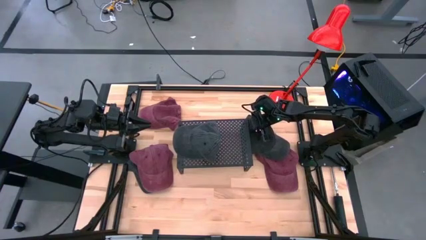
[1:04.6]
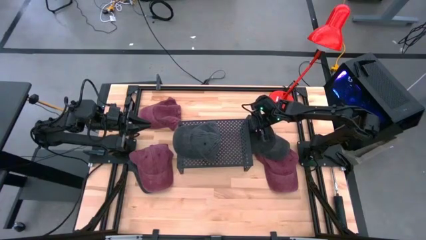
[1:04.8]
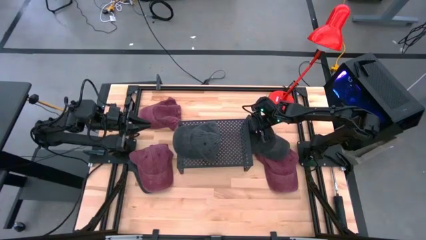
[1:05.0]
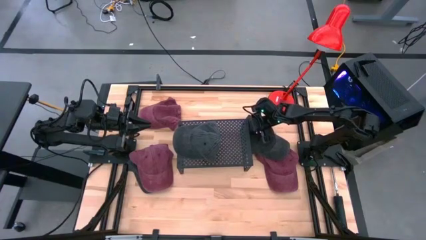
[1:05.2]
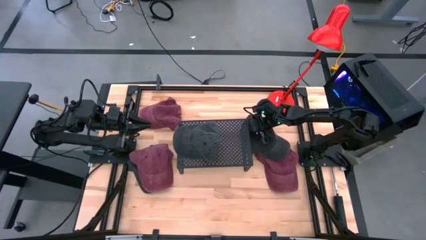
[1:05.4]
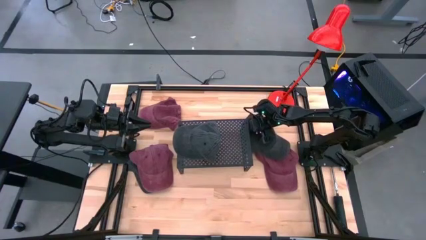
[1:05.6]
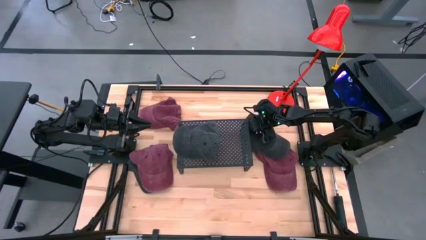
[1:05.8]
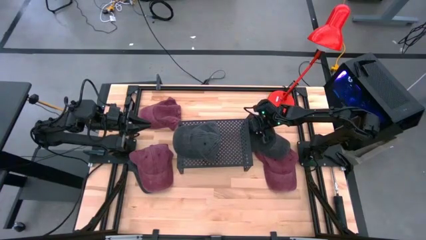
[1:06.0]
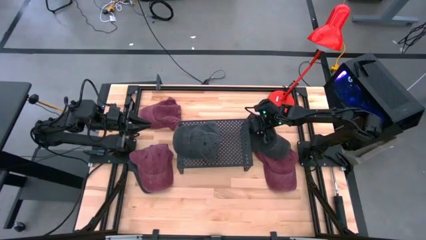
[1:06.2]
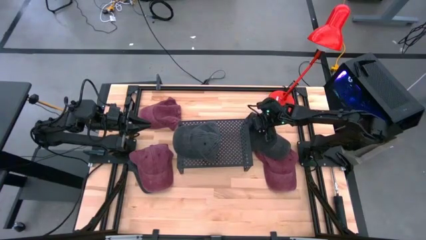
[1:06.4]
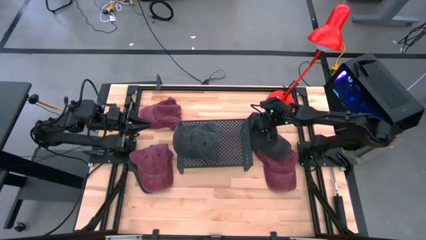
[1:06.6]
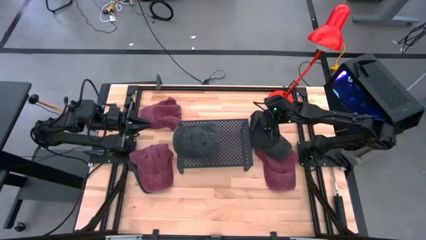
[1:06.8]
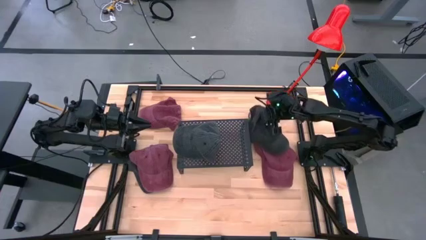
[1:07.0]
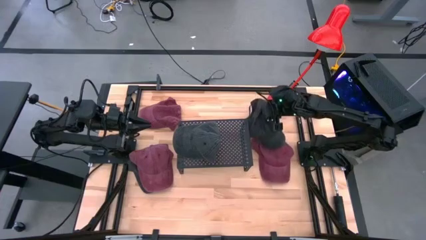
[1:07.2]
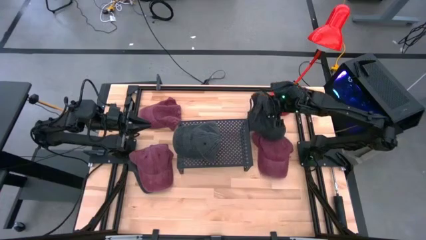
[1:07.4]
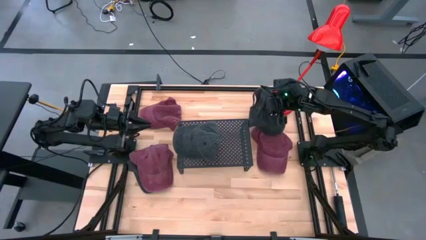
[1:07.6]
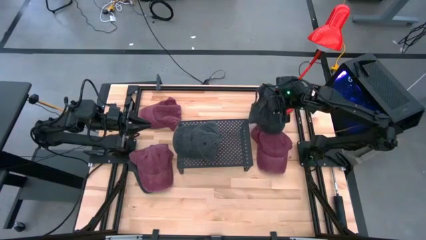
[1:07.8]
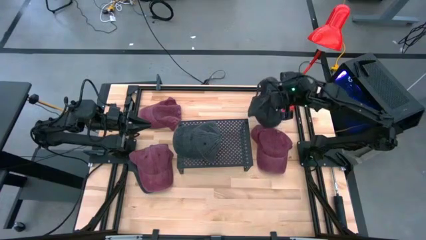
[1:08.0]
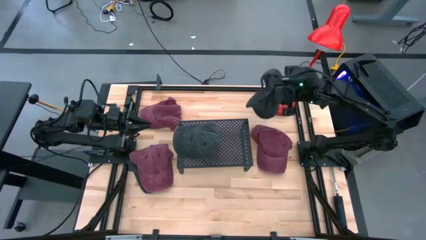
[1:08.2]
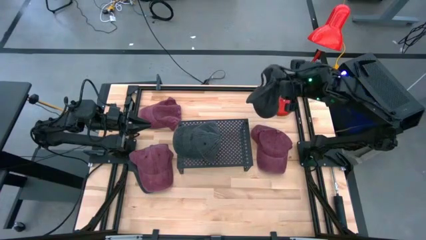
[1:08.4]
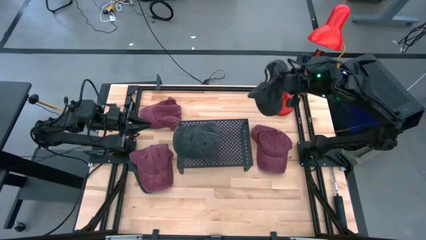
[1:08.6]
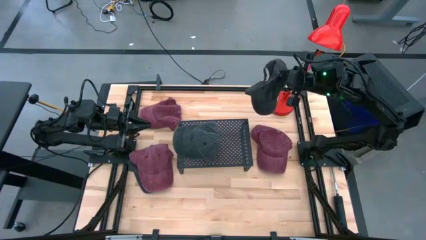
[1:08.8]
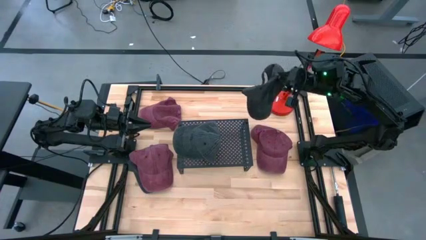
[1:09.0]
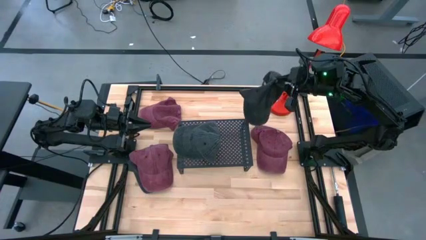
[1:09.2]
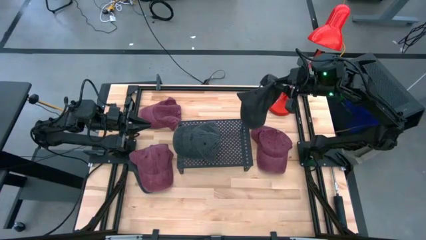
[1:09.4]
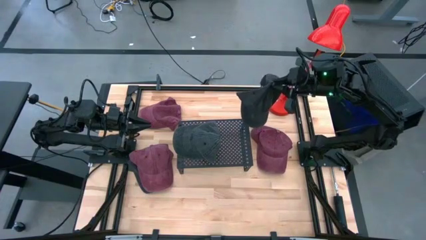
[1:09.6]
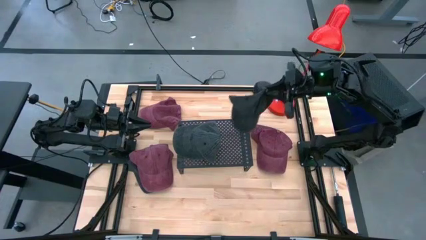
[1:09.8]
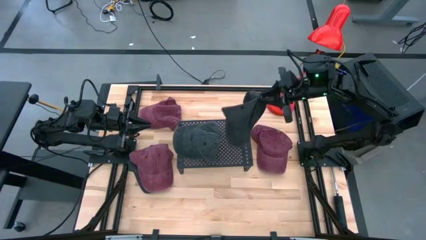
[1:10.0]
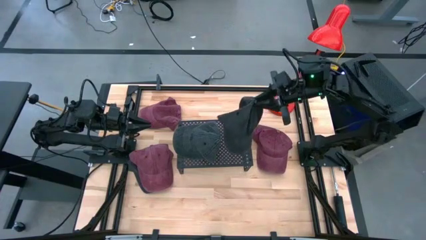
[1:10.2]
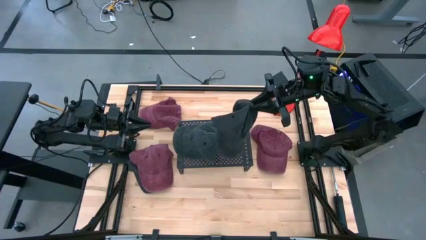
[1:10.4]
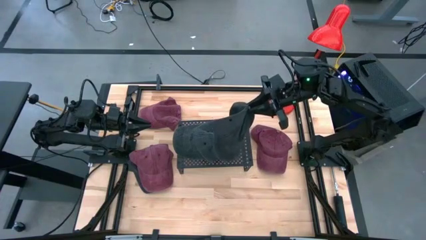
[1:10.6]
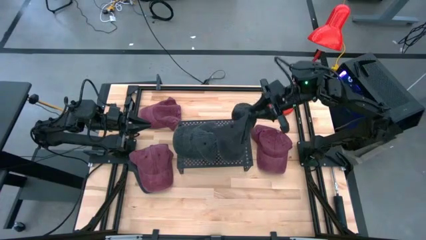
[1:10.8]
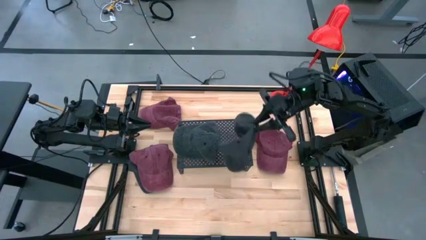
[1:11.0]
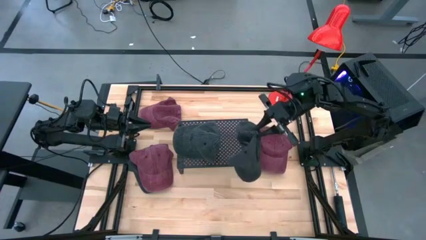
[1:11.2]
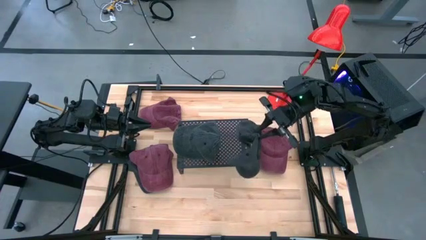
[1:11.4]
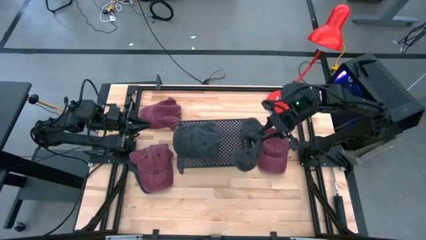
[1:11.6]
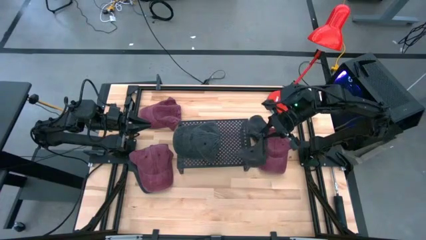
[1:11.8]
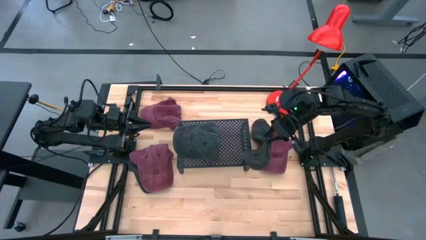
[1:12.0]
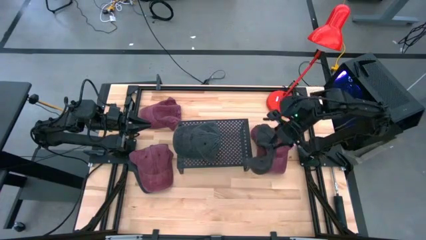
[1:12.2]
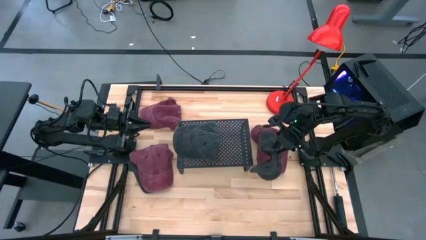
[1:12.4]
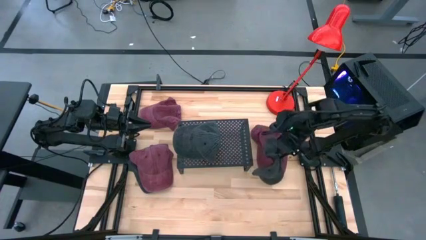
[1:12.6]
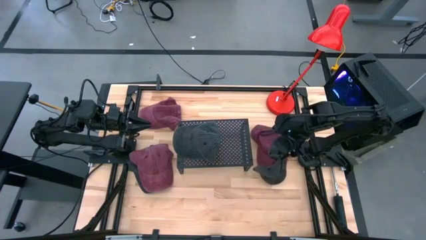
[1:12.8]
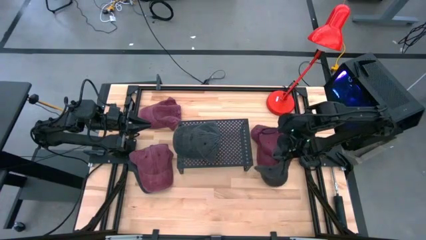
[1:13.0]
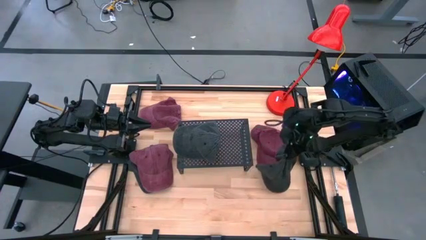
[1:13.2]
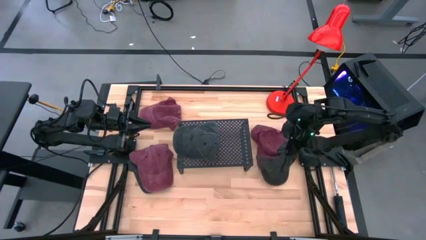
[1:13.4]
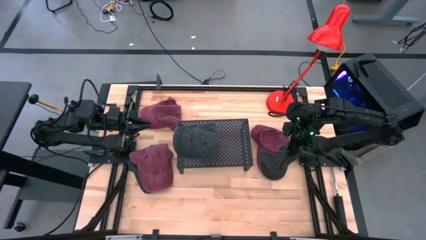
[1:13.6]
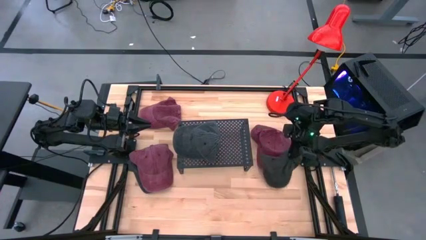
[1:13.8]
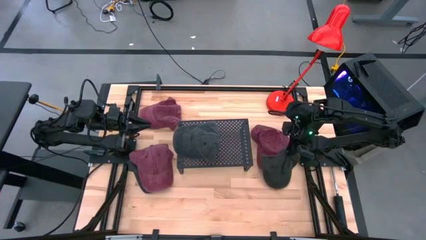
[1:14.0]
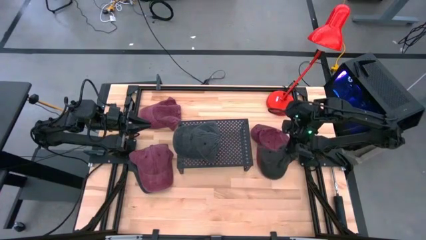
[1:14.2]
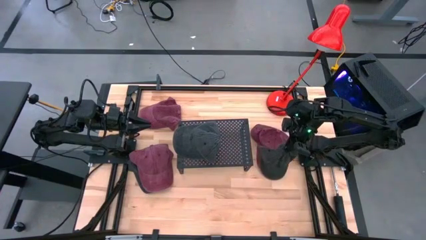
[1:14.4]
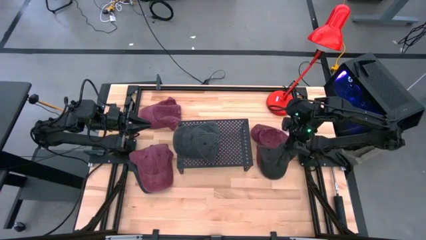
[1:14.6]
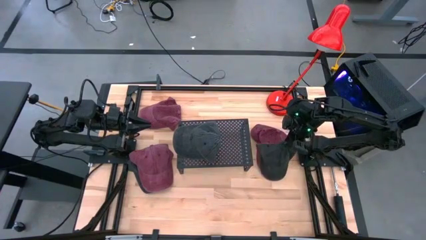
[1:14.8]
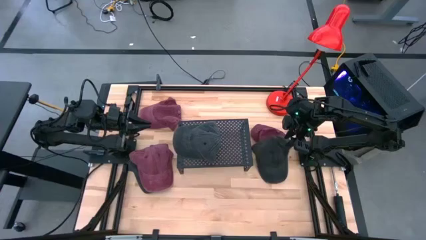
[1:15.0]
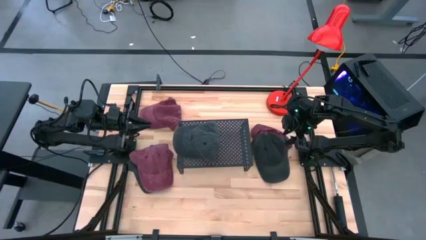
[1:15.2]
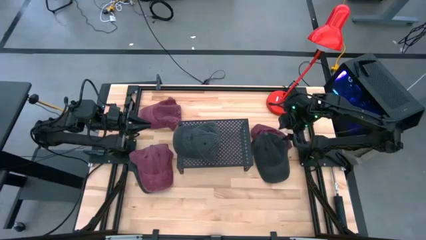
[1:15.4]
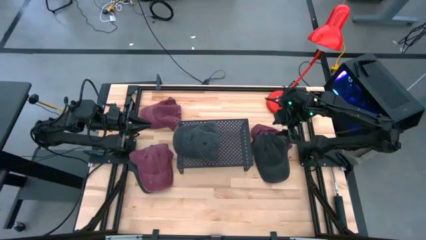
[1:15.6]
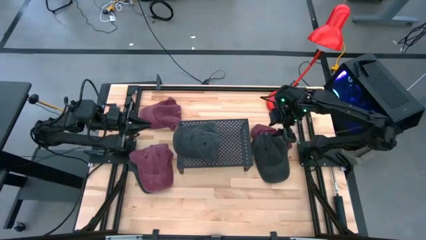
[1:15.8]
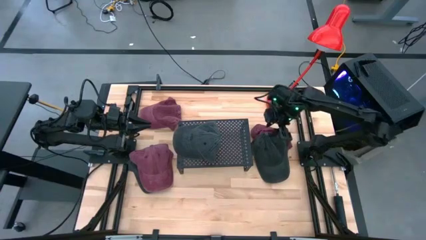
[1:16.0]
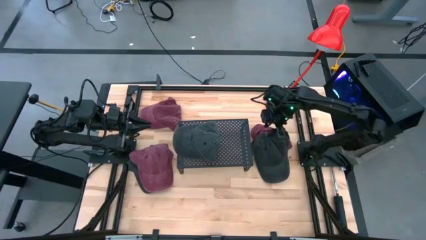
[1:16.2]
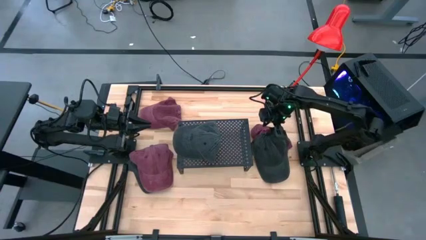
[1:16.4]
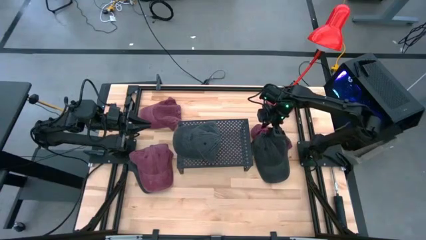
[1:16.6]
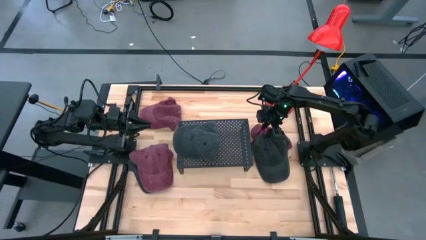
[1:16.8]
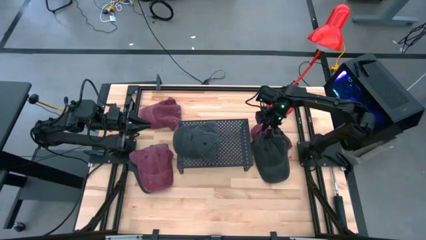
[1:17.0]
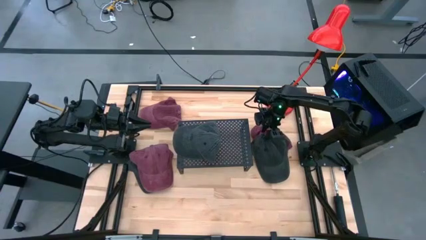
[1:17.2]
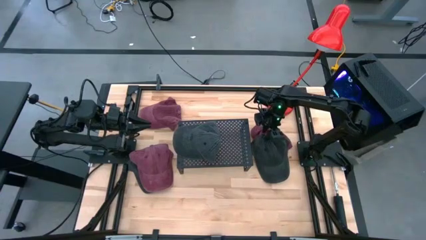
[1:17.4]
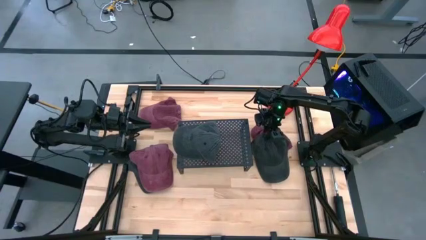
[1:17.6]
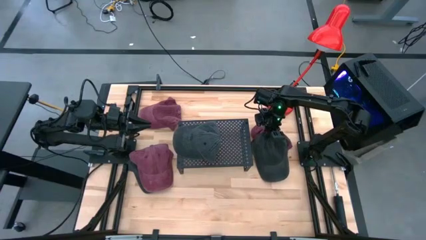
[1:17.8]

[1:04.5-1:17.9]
Task: Pick & Place hat
Stack the right black cap on top of the black cap on the shelf

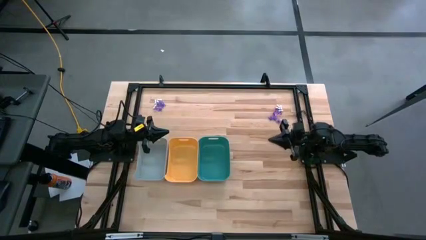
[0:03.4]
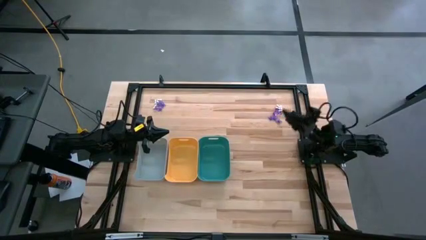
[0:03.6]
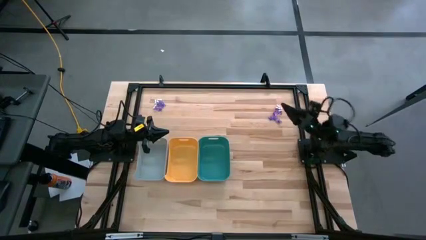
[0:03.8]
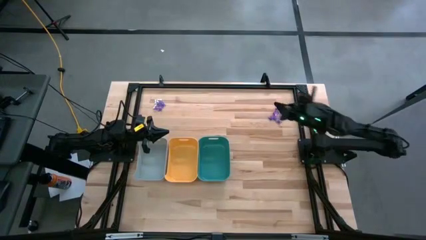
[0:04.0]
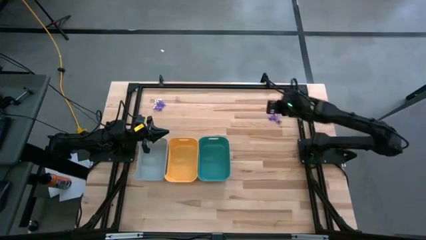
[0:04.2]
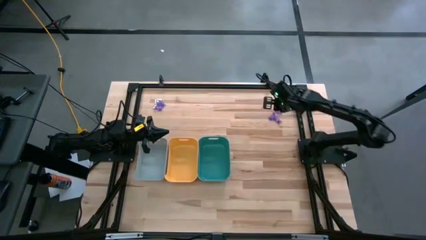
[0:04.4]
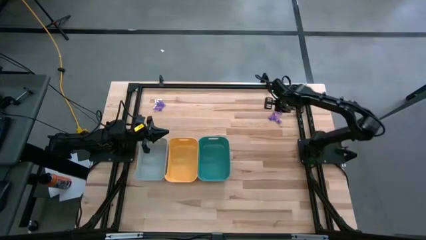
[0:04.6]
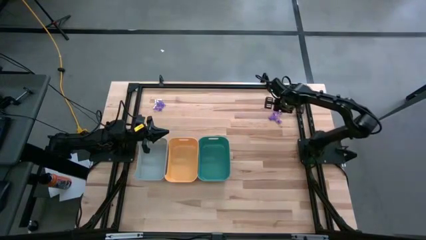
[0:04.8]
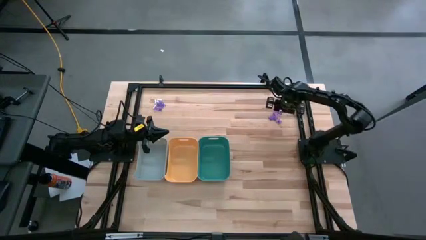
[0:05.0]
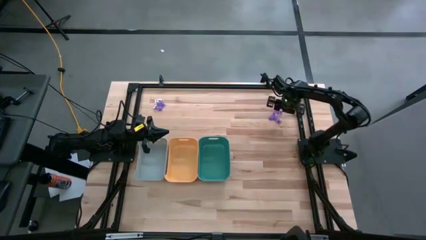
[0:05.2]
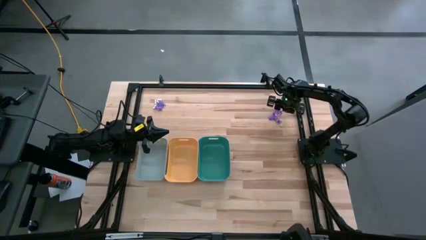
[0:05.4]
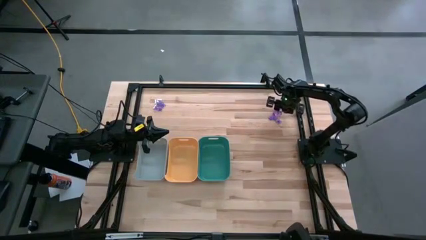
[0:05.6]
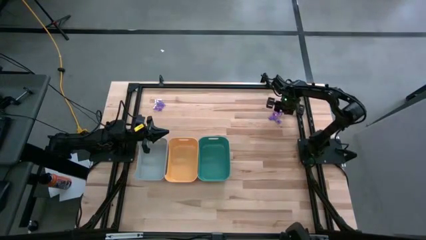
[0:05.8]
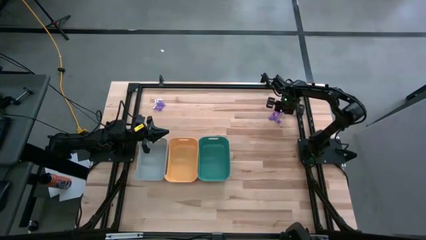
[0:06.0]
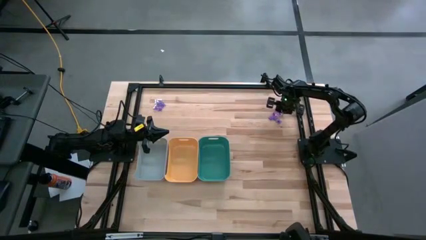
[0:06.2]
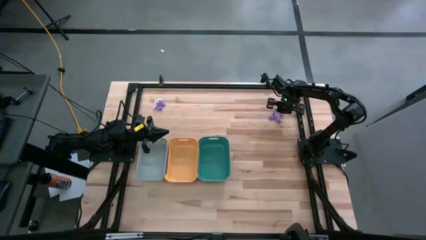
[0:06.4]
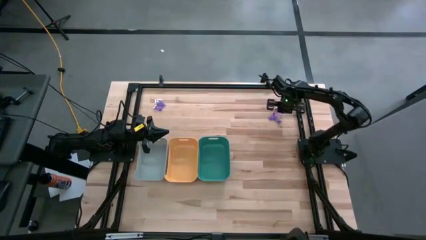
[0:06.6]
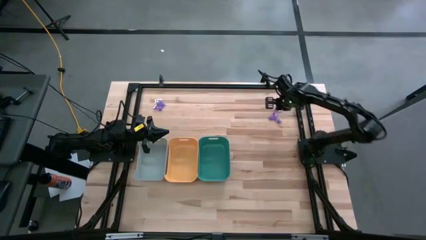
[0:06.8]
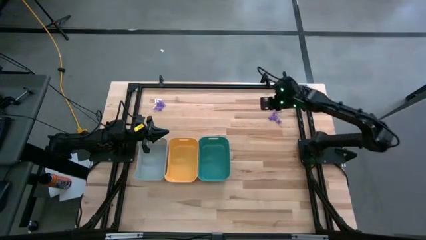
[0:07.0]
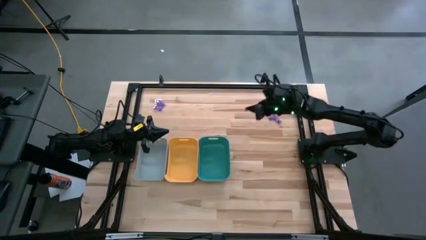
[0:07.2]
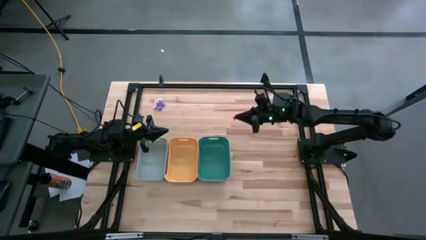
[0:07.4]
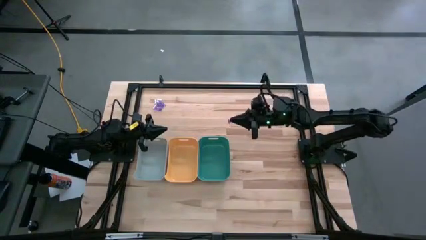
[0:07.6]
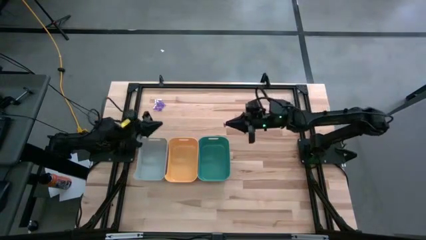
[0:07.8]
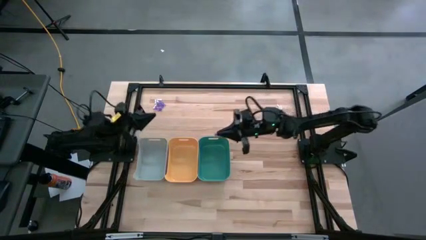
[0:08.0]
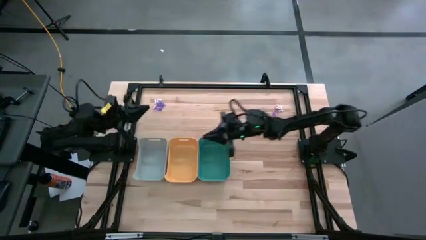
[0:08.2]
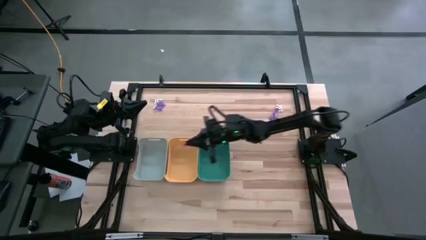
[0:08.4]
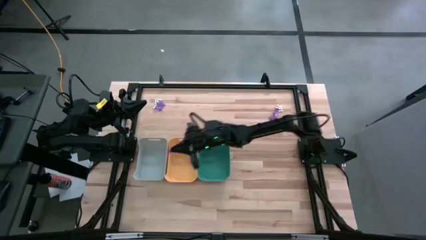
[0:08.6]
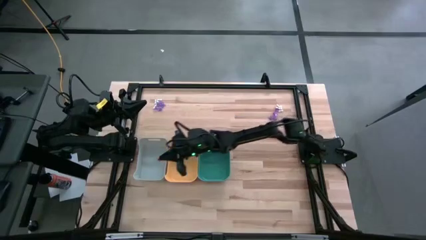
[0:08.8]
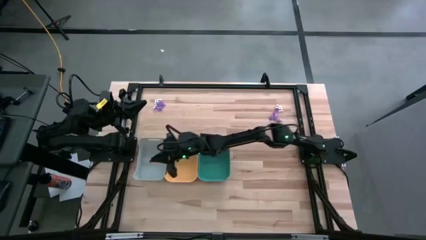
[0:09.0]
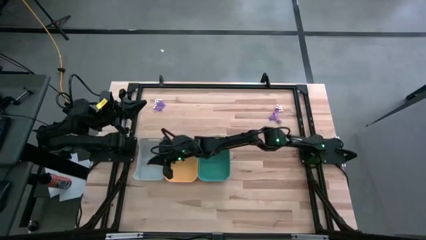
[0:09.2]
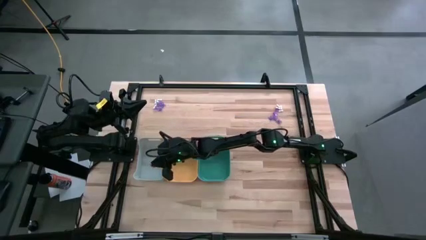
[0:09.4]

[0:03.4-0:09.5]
Task: Sort Halloween decoration
Put the purple witch hat toy into the white bin
